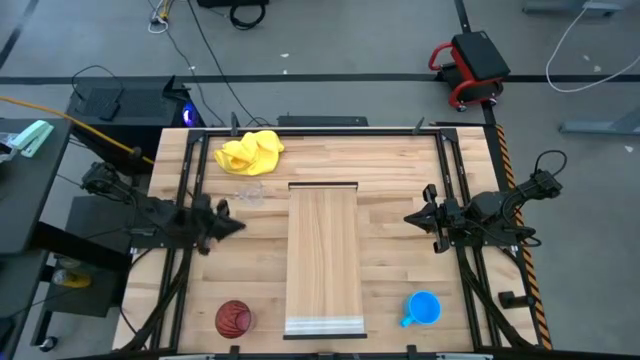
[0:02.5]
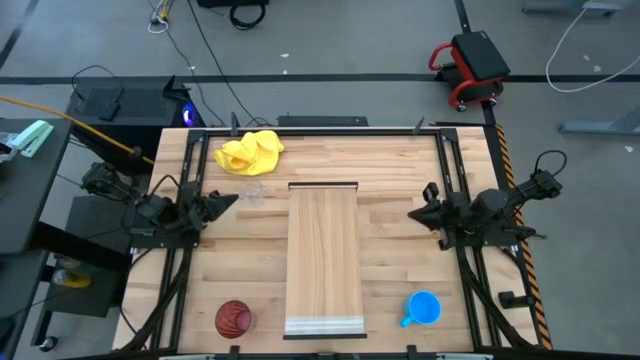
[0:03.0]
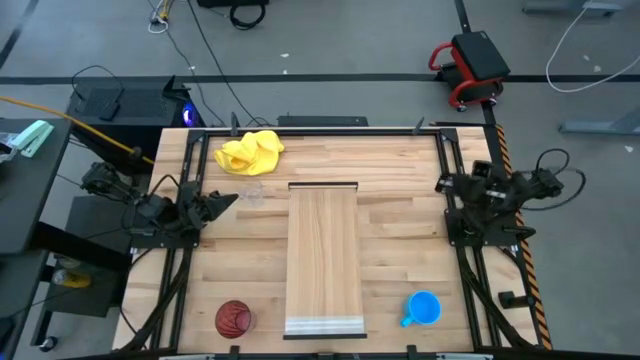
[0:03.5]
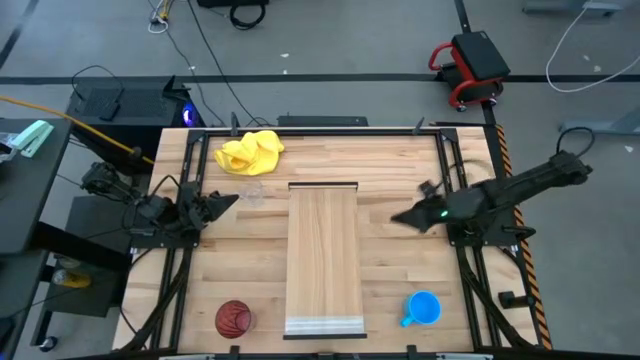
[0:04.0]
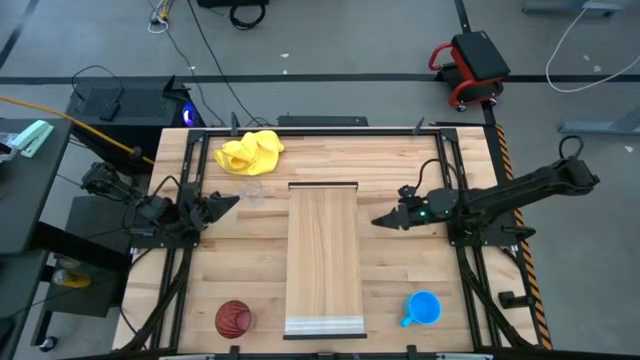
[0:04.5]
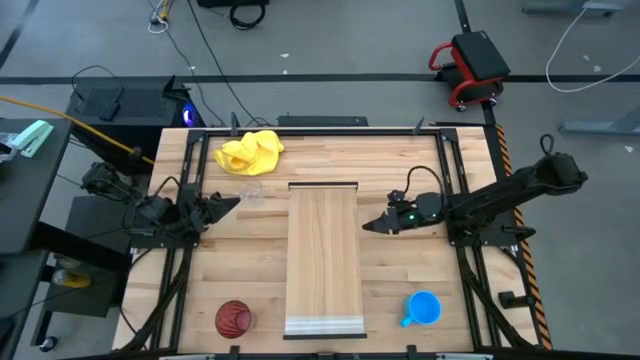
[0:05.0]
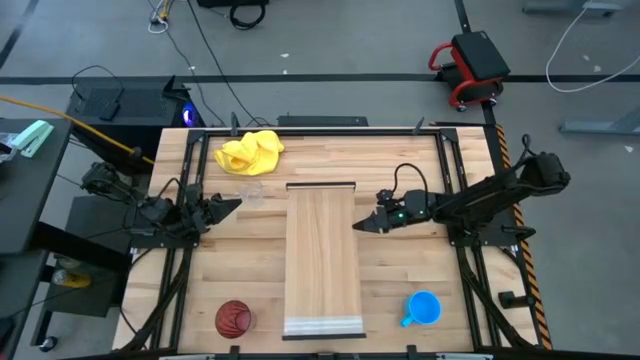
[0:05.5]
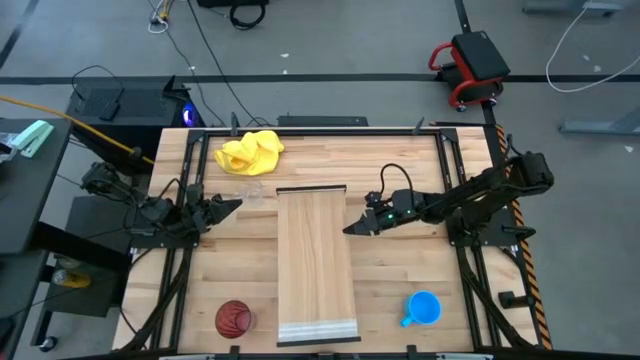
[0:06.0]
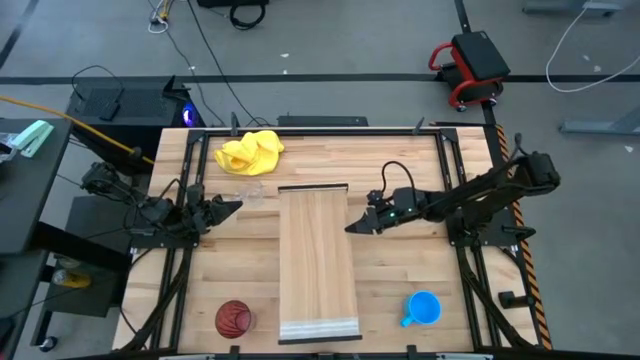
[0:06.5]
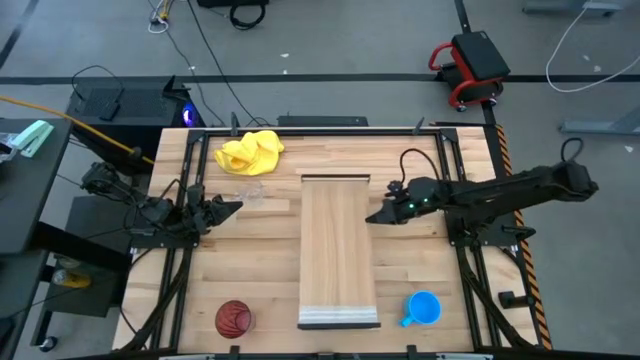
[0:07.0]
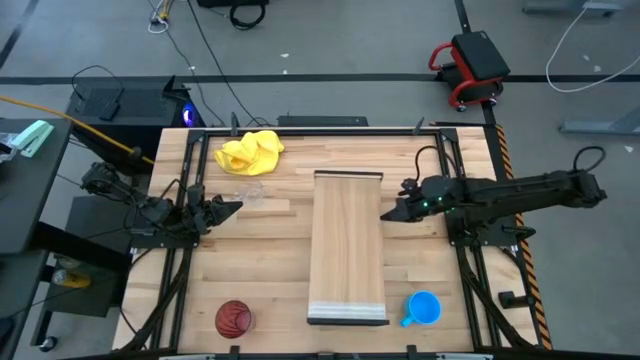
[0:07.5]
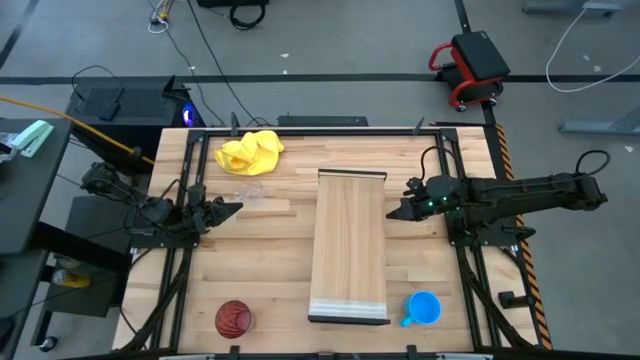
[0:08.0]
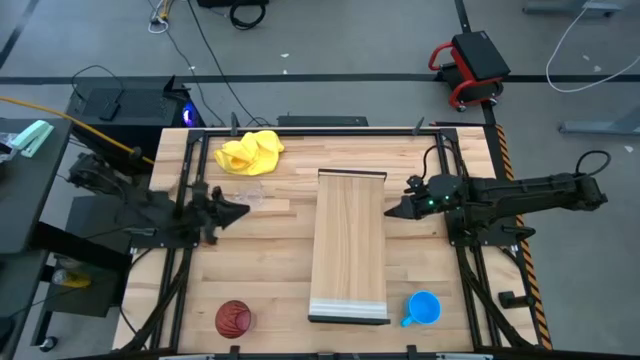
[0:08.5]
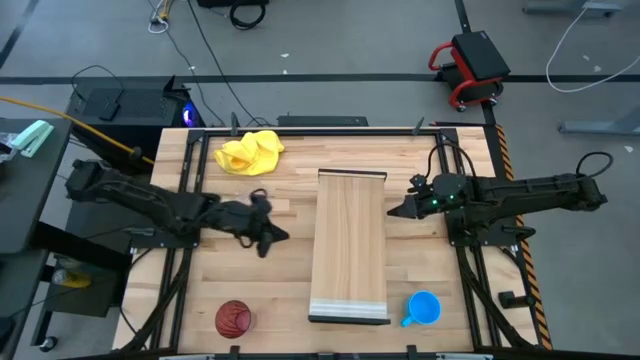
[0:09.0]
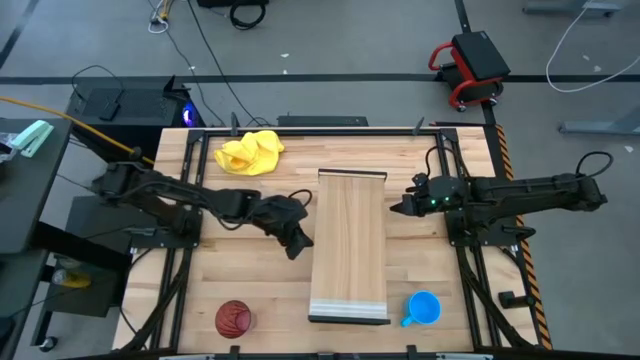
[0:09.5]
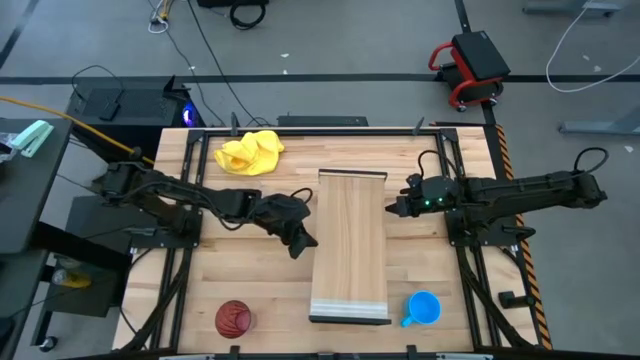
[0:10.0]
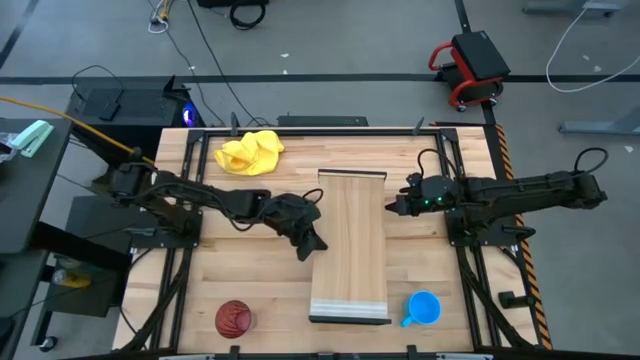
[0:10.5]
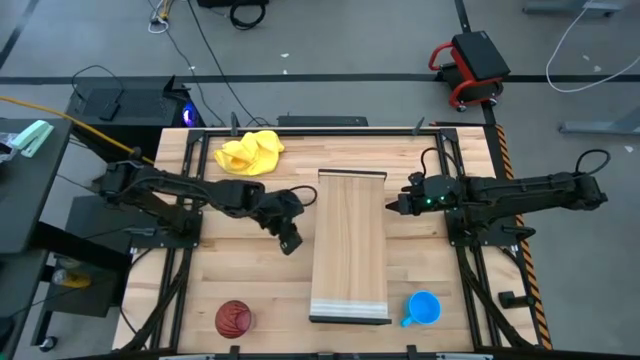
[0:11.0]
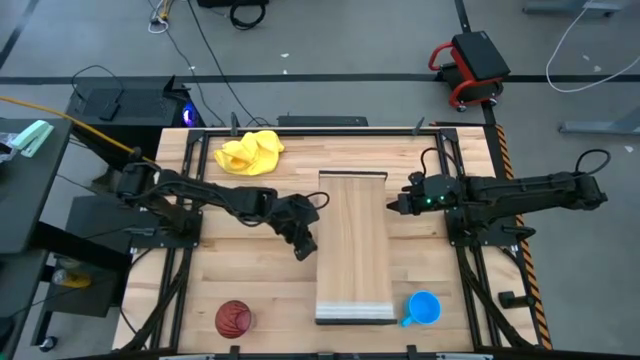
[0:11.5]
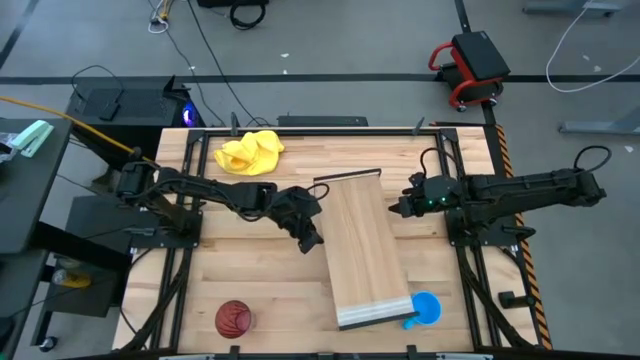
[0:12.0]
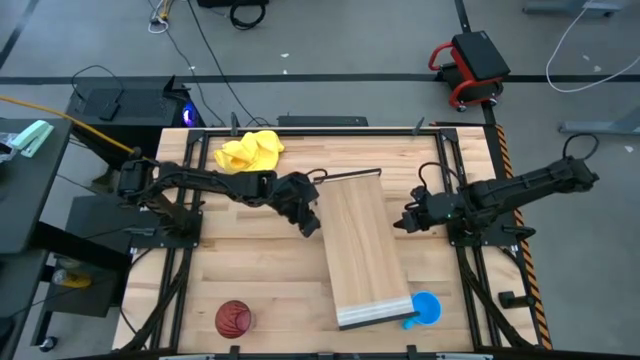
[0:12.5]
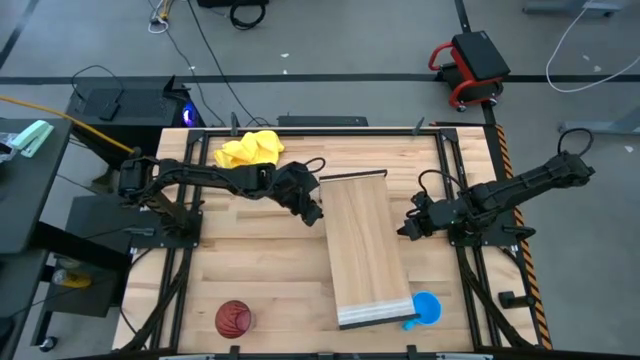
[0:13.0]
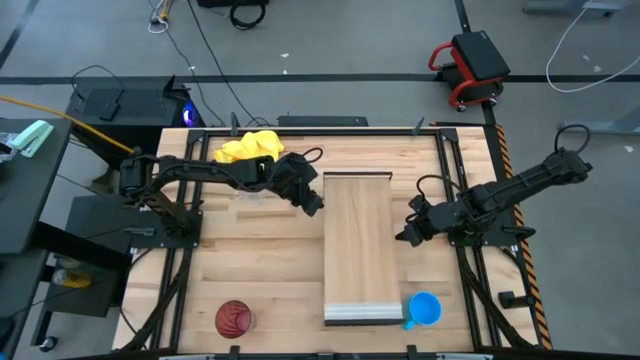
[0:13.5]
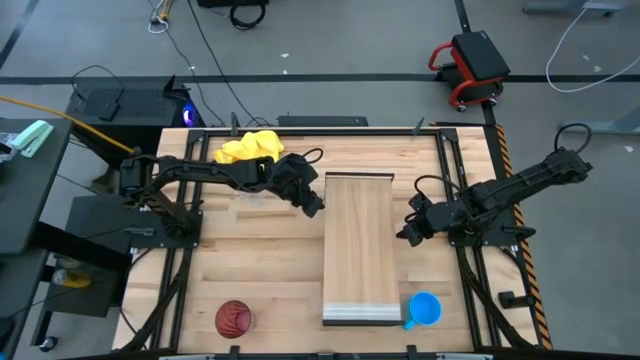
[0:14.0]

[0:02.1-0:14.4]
Task: Stack small to large cups/mugs on shelf
Adjust the shelf on the table

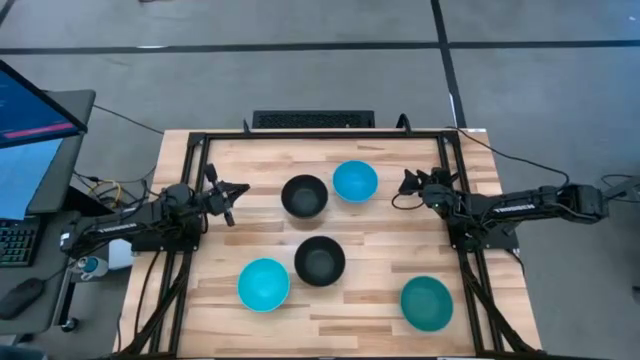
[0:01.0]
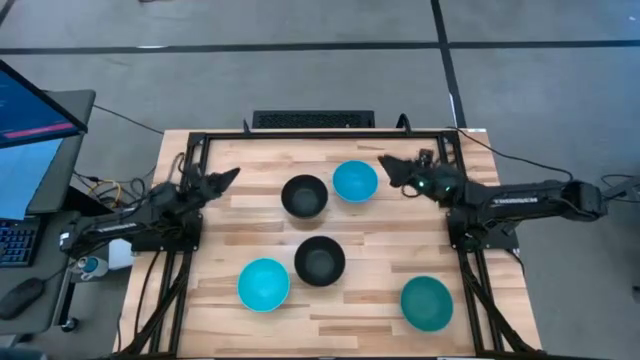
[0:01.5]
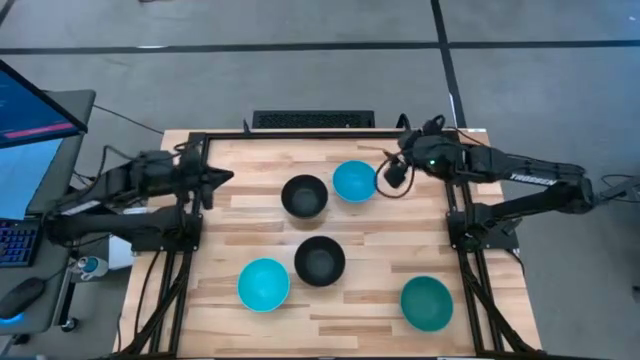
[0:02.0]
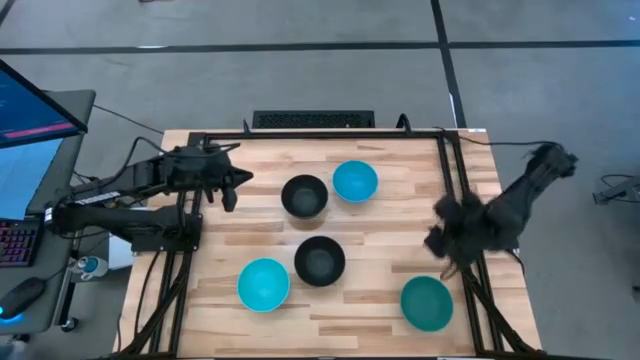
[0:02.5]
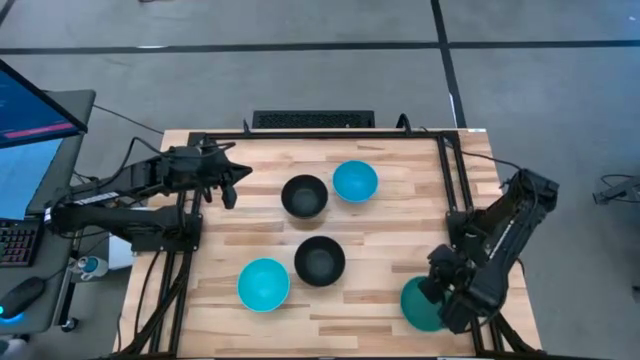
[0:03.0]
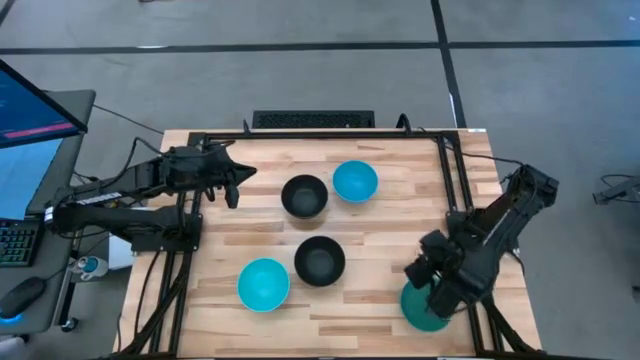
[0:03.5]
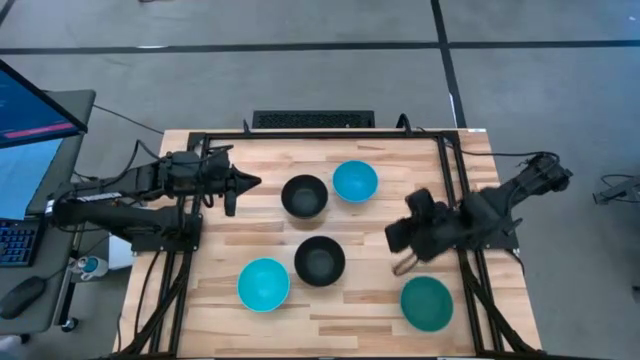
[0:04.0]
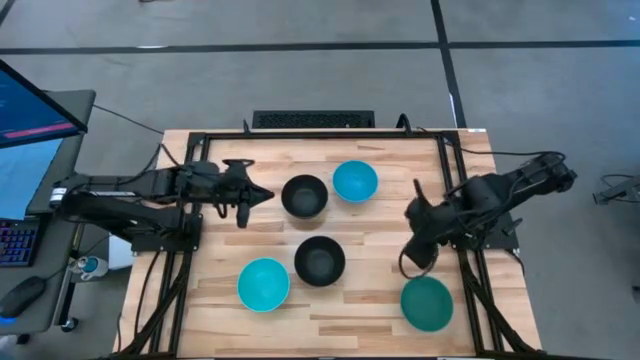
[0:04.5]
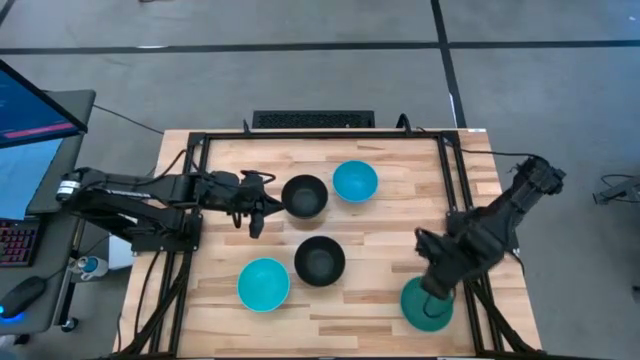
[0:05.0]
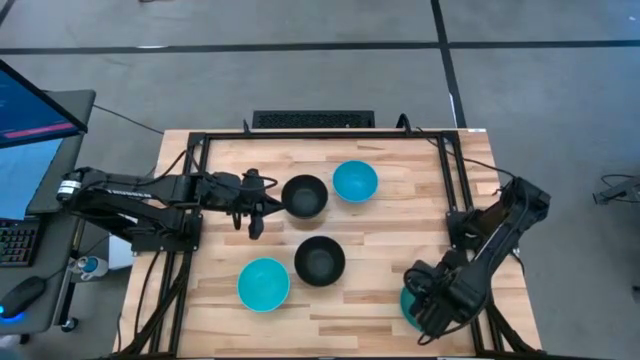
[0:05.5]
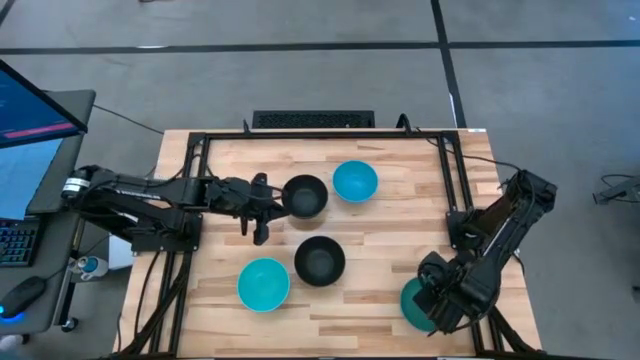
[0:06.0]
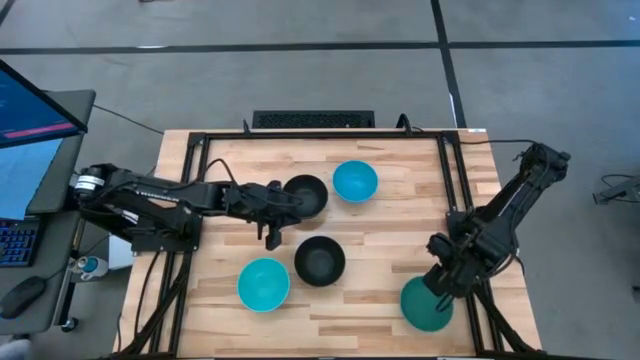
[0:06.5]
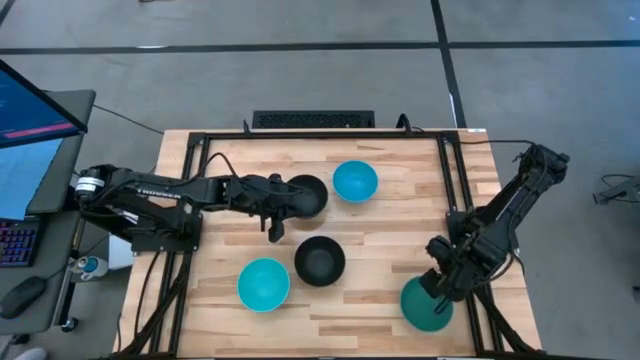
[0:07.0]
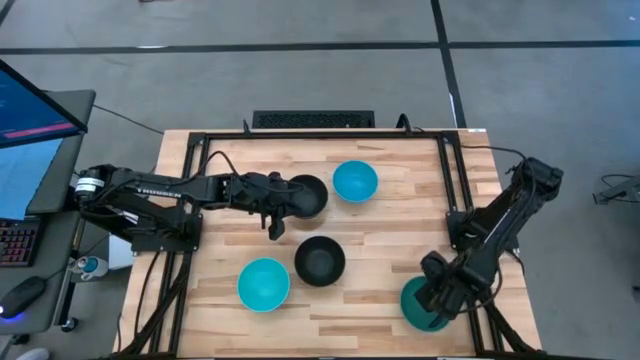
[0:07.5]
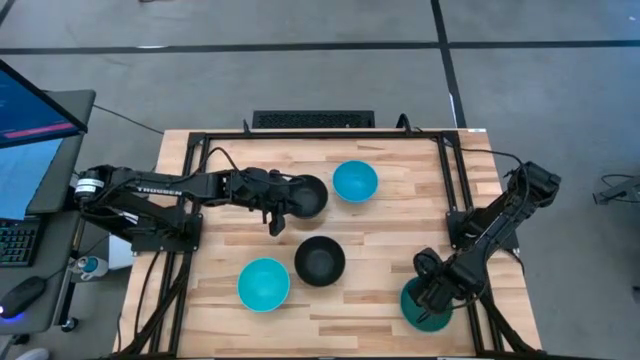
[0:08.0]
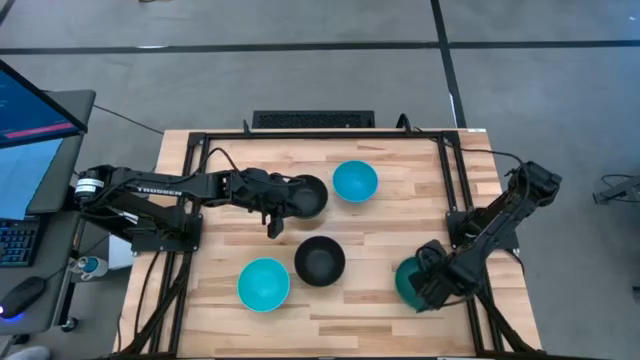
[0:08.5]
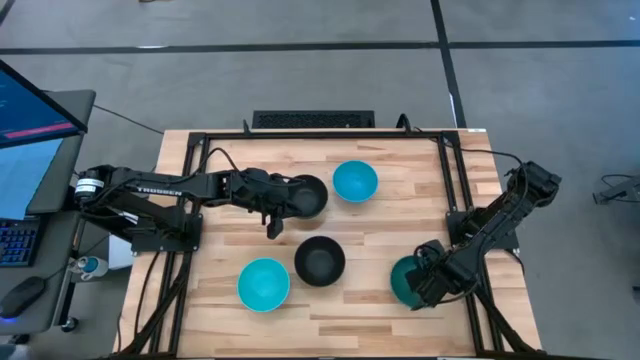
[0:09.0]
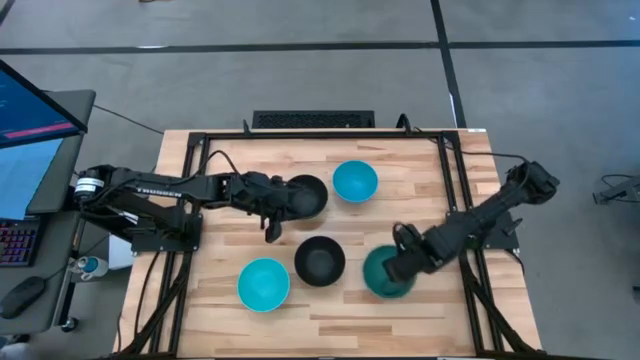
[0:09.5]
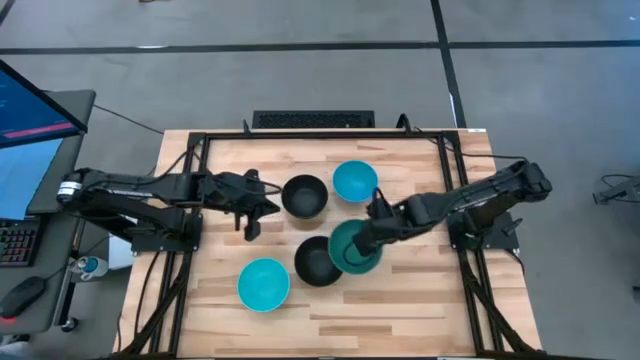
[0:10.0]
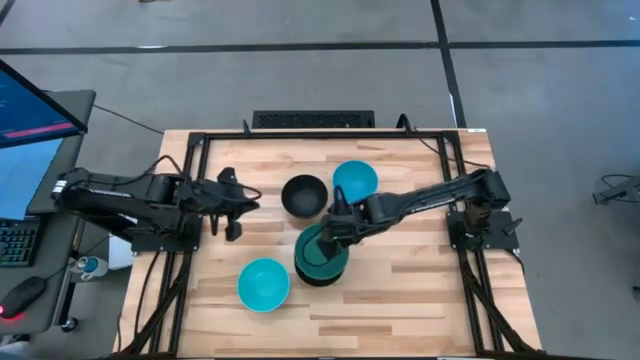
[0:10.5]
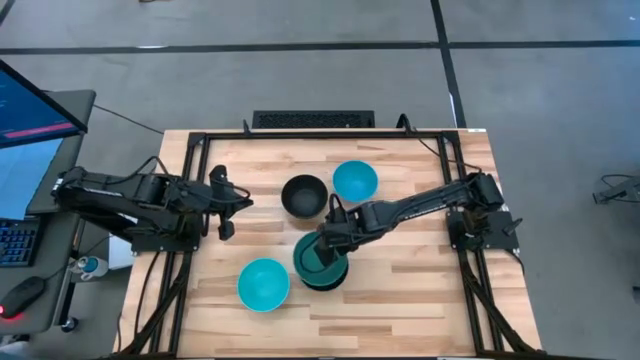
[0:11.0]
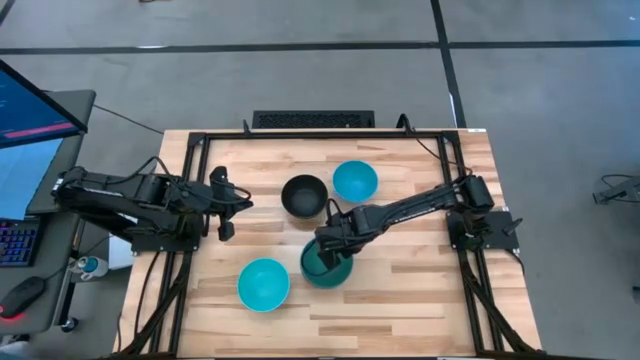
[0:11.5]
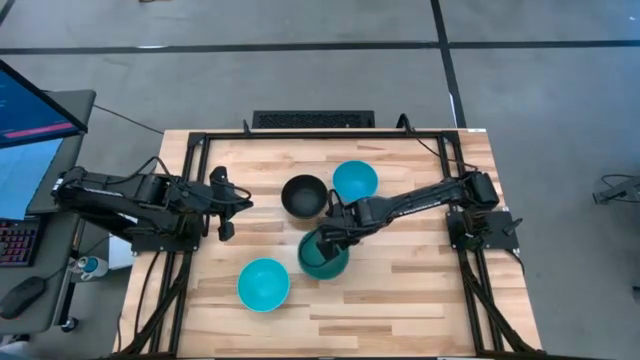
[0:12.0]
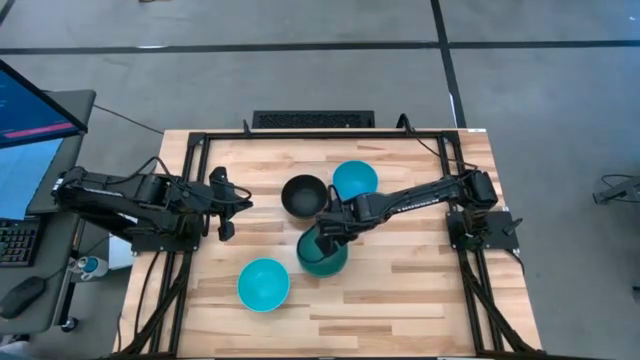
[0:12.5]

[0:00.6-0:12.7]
Task: Nest bowls inside each other
Stack the green bowl on top of the black bowl
